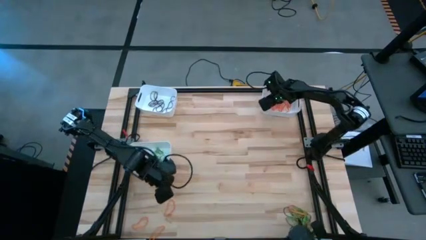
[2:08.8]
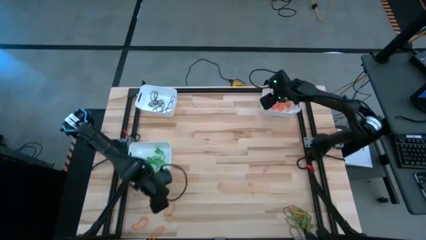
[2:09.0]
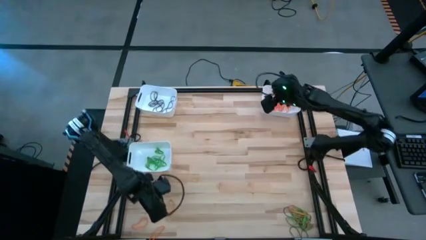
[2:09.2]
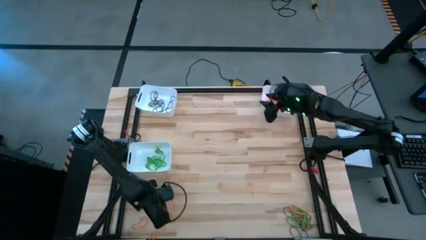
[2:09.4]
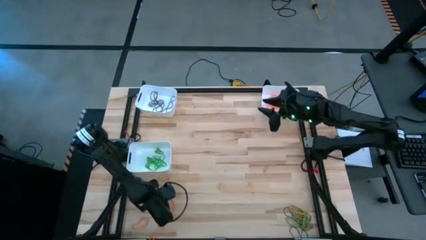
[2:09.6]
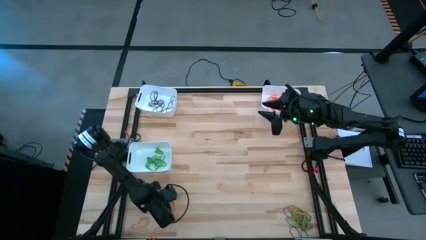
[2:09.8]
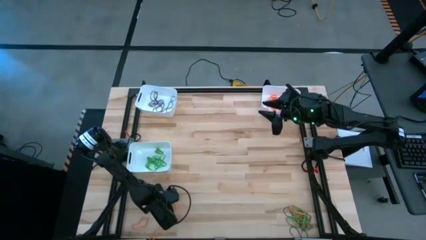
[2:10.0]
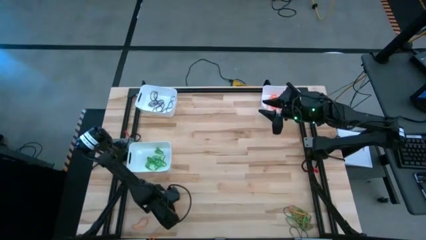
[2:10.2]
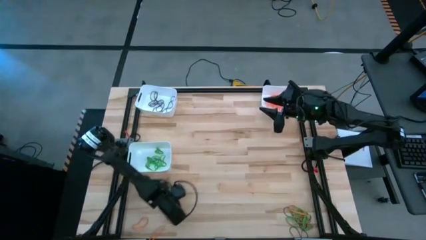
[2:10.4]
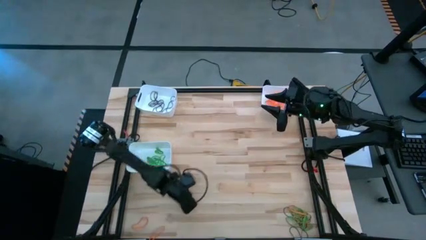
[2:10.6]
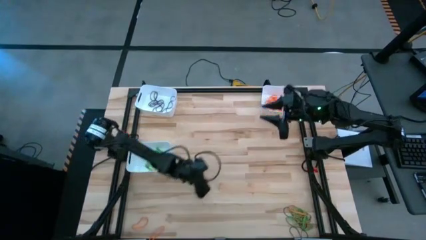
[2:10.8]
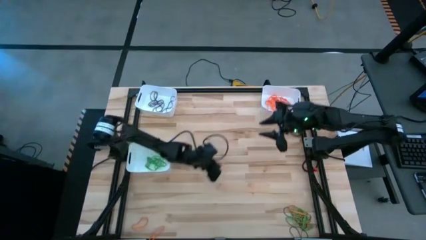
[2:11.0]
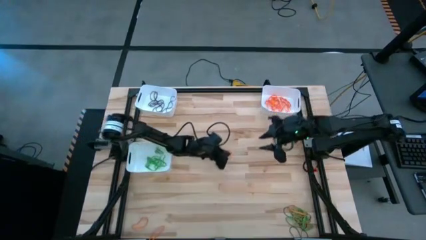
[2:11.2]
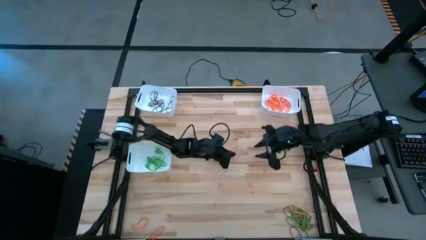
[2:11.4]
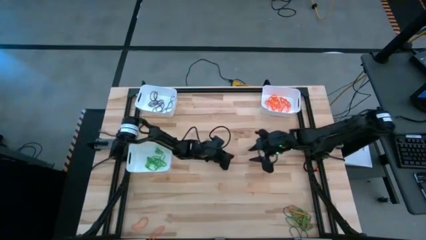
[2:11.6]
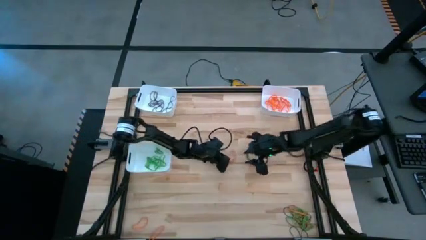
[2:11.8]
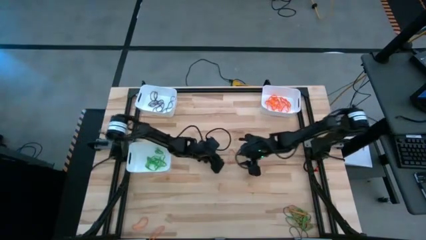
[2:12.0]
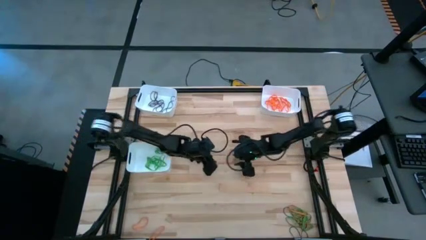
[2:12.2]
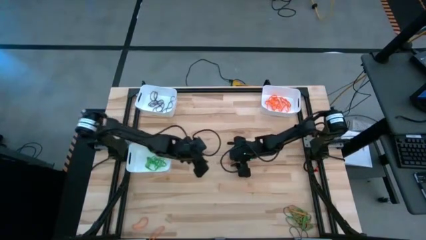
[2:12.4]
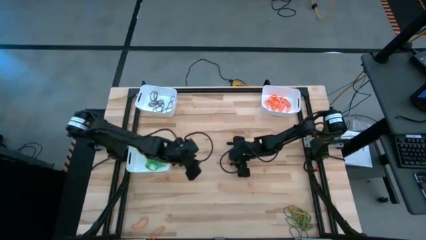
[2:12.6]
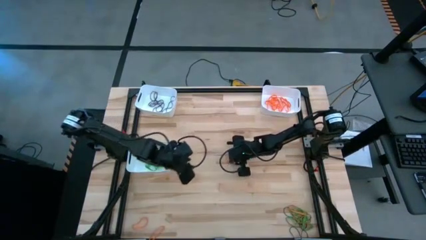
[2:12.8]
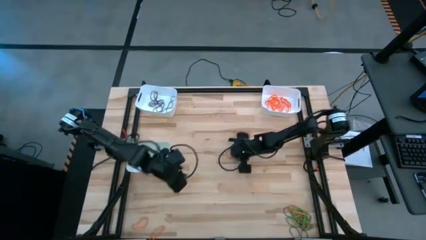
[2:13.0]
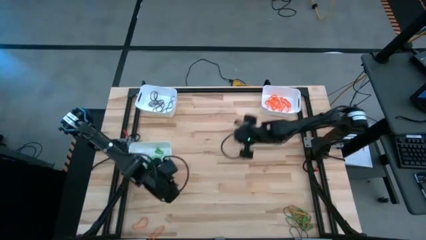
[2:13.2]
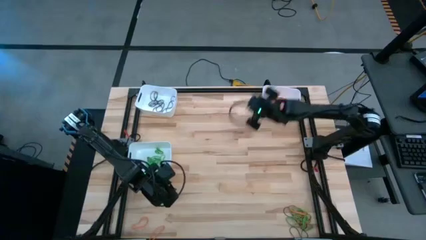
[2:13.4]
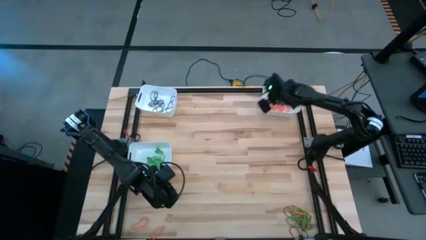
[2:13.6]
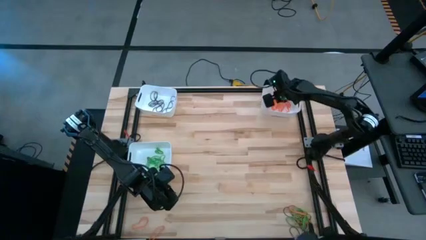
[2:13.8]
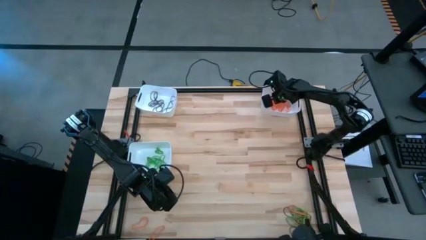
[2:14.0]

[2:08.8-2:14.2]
Task: Sort rubber bands into baskets
Put the orange rubber band into the top right white bin

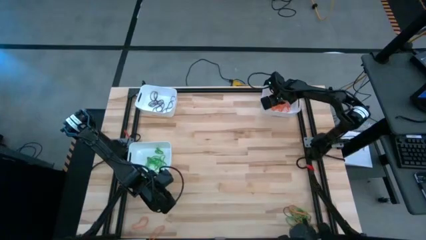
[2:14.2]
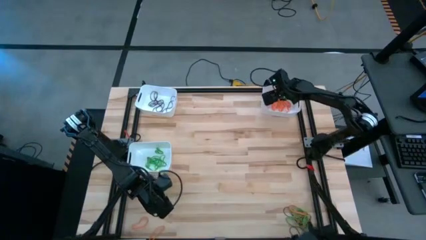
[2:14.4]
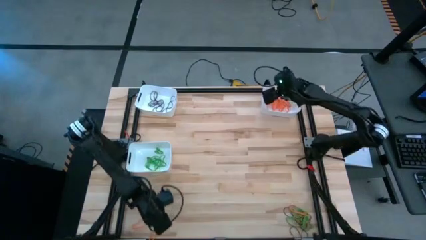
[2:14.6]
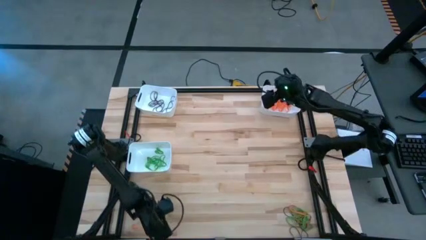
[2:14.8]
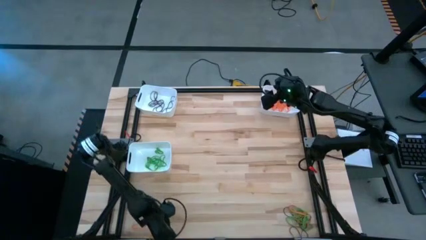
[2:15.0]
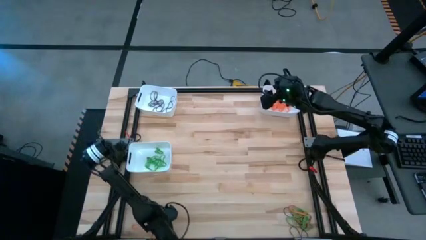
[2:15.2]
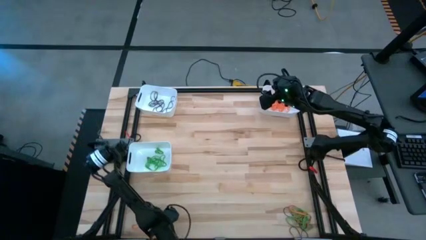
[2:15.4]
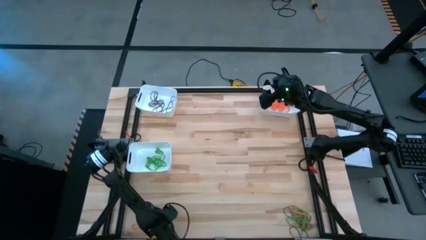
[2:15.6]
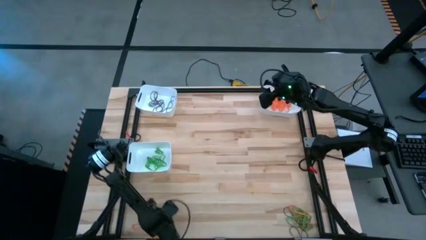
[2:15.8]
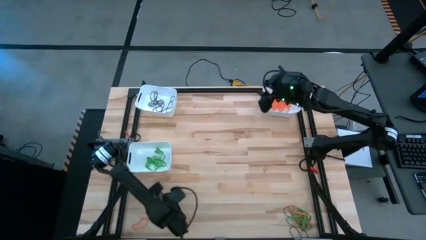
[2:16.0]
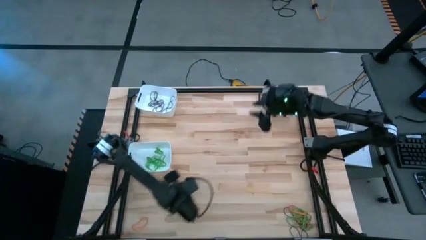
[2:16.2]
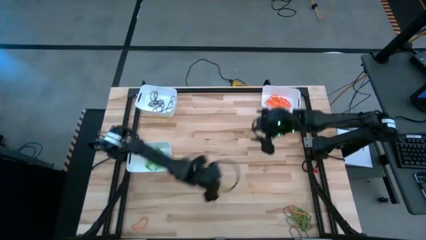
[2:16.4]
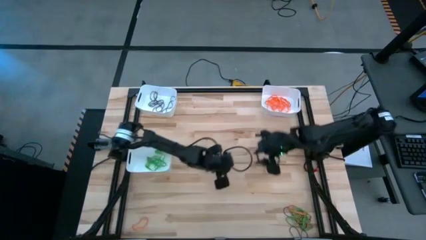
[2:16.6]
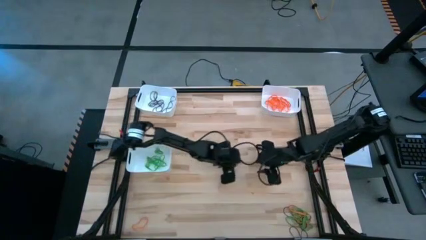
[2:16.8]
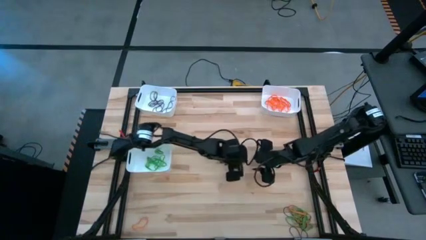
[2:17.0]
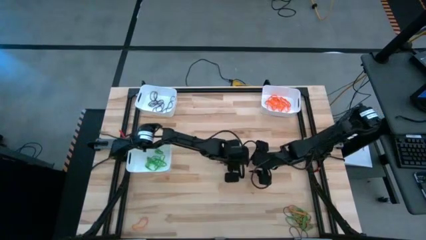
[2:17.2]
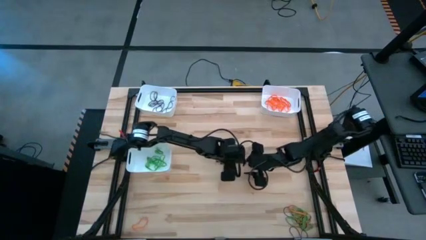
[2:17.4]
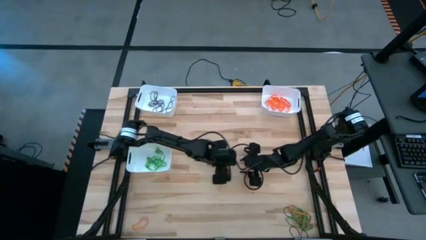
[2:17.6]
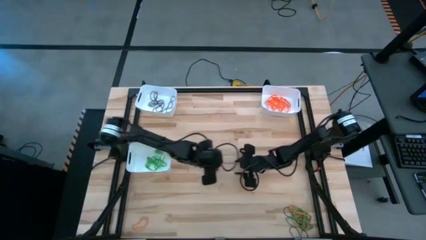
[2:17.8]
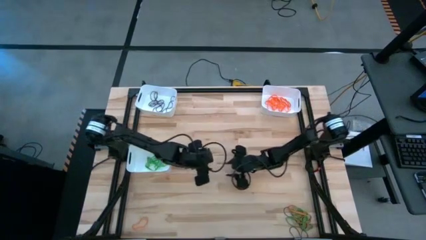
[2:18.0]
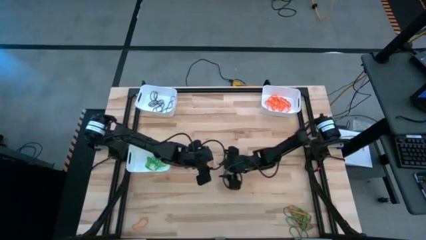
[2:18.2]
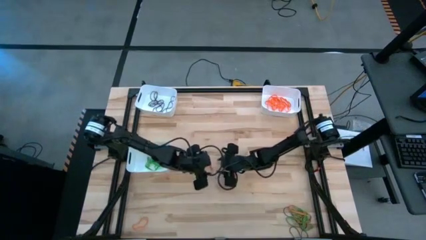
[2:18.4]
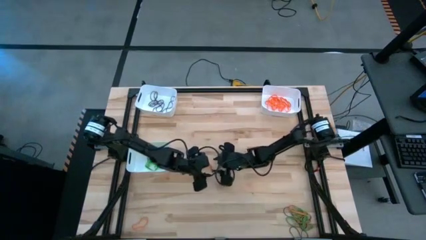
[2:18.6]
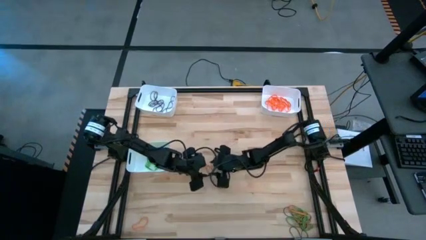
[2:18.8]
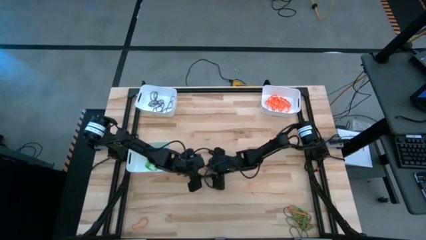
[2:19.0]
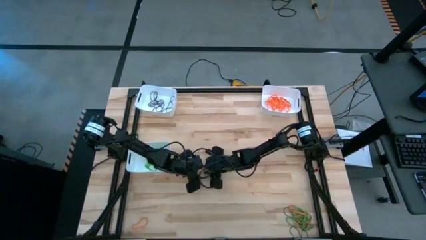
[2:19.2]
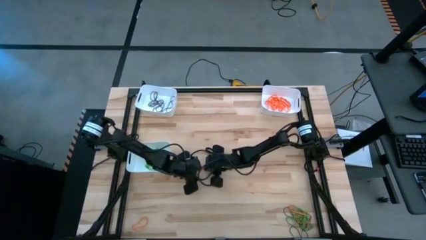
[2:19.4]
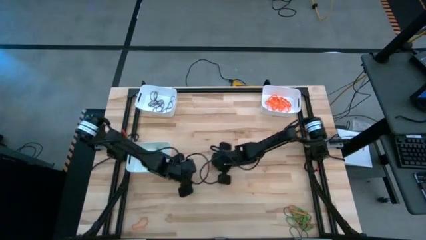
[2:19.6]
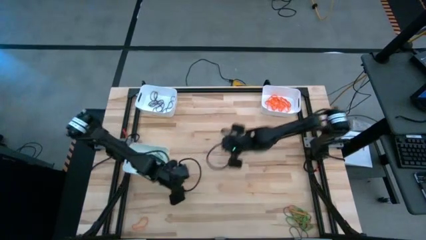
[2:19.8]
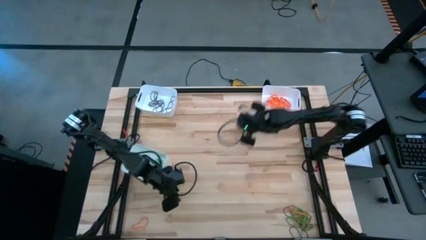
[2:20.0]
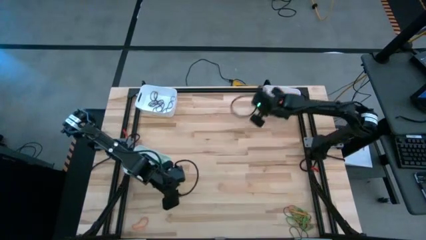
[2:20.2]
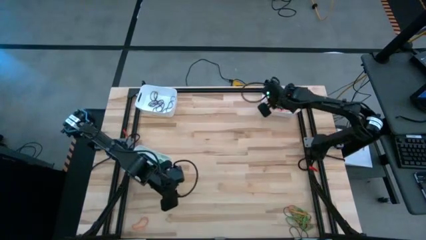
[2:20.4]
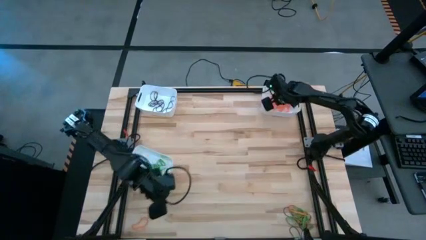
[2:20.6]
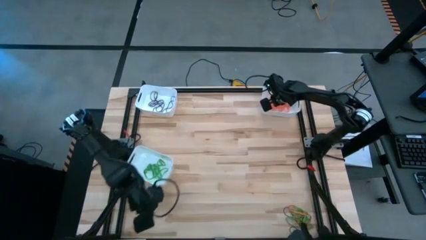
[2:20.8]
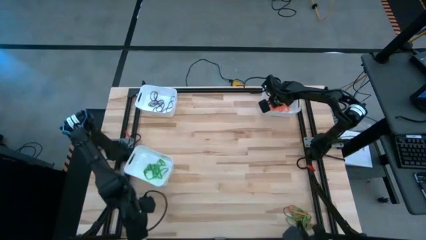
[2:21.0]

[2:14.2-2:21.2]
Put the orange rubber band into the top right white bin

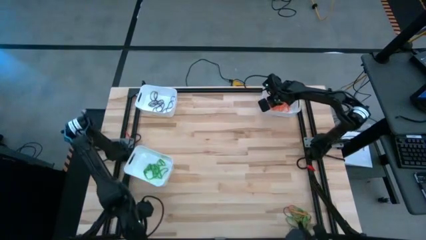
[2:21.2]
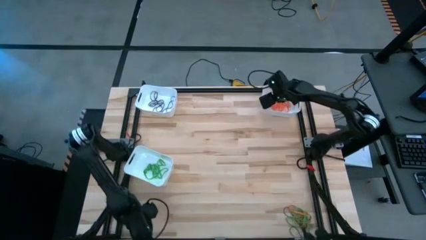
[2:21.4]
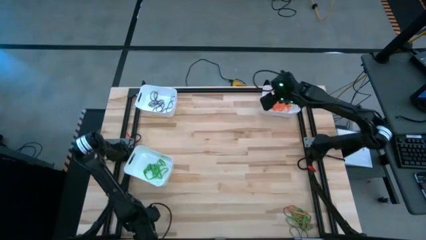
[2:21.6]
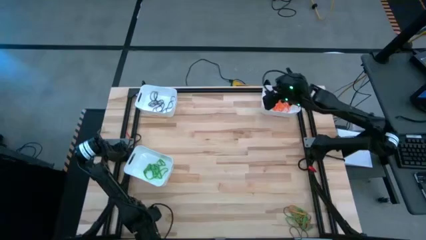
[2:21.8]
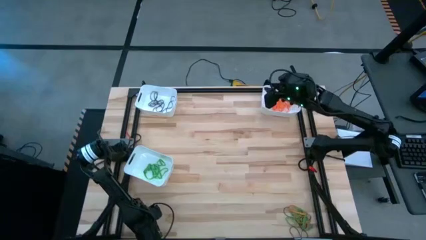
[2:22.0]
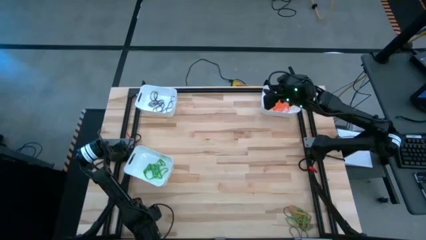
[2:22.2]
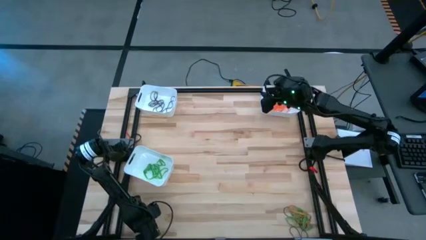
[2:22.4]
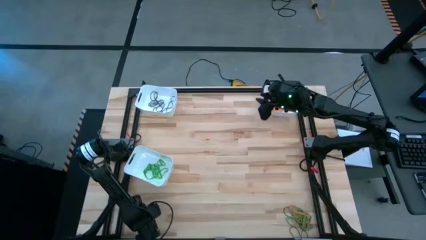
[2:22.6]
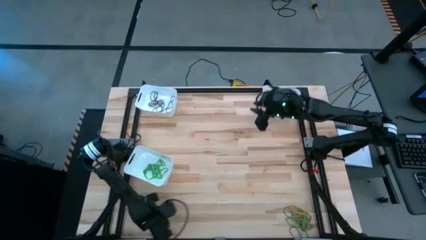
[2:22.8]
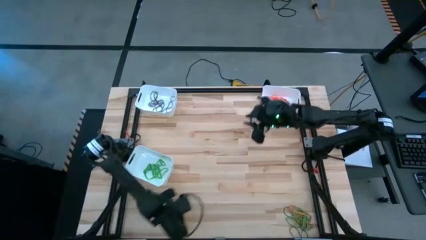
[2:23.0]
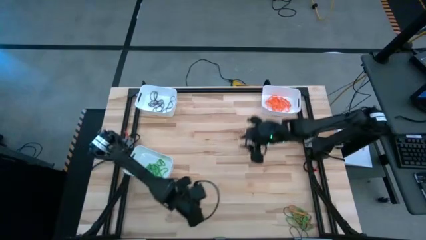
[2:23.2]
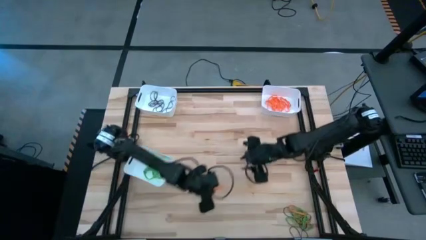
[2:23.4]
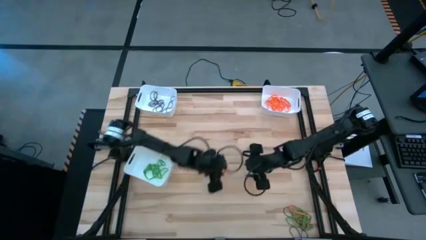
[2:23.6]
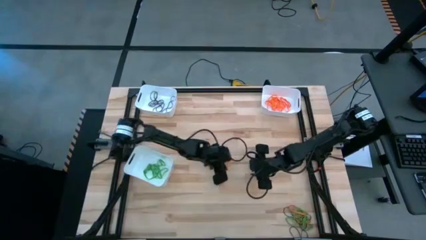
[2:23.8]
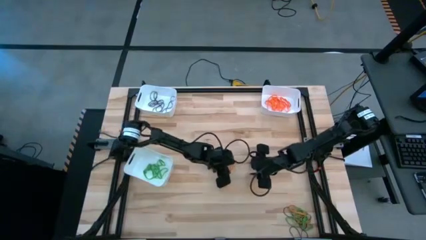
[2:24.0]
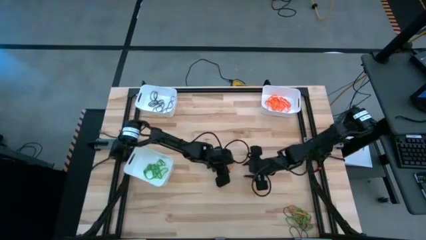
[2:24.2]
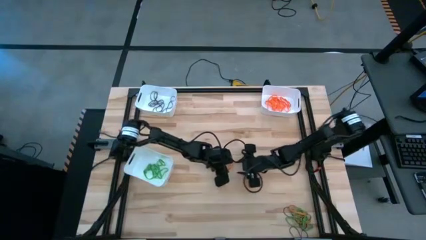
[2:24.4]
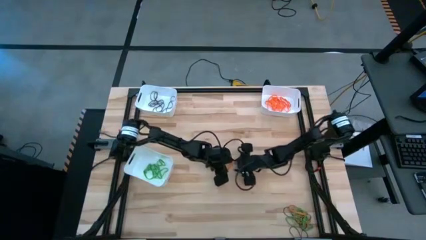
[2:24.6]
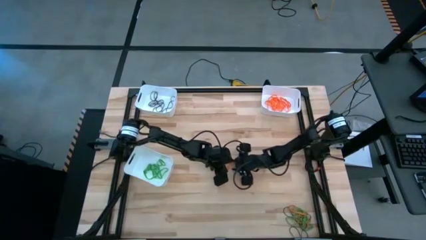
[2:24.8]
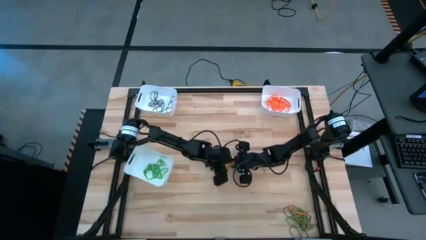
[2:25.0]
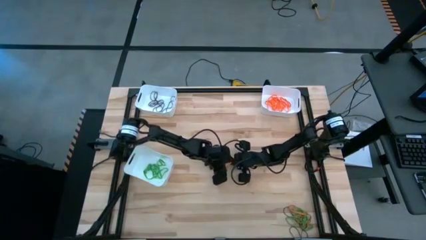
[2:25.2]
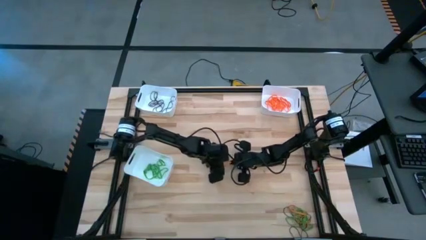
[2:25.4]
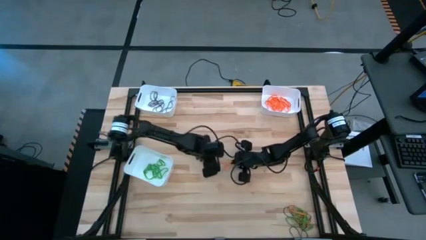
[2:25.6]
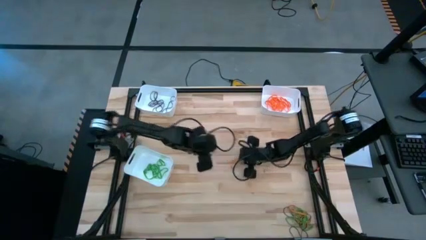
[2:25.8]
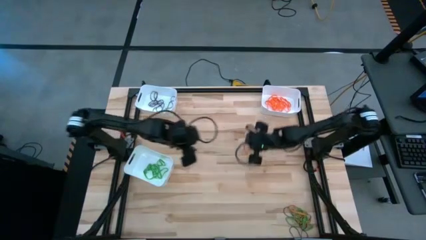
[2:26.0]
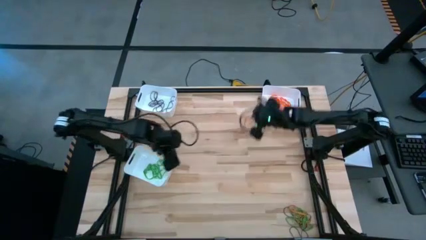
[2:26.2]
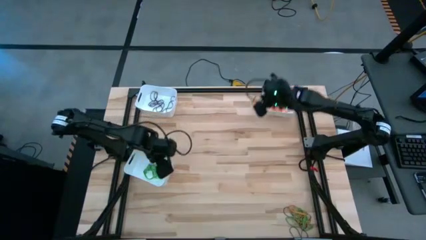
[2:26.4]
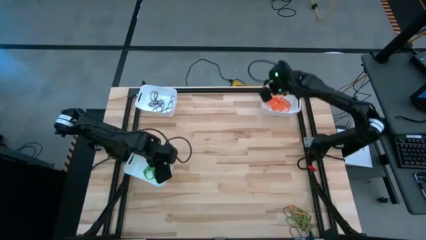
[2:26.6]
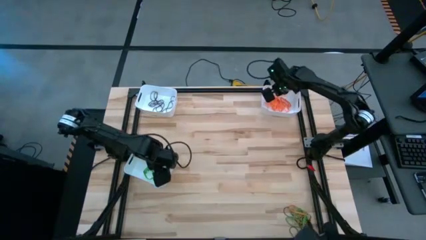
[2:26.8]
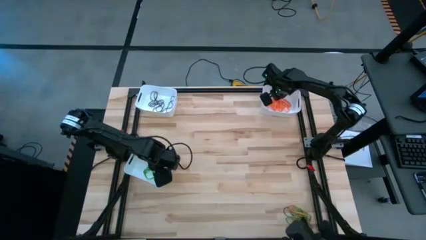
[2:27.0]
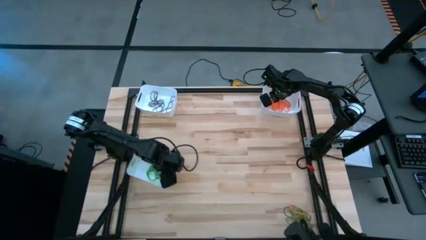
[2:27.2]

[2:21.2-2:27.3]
Put the orange rubber band into the top right white bin
